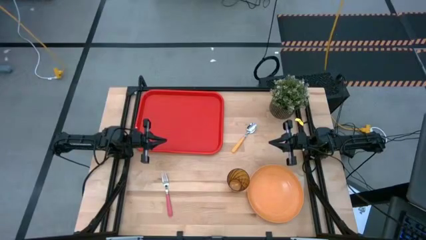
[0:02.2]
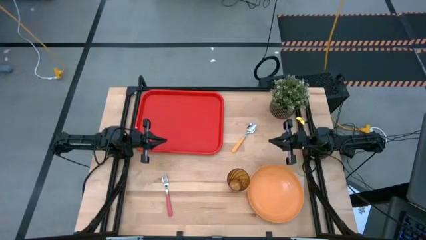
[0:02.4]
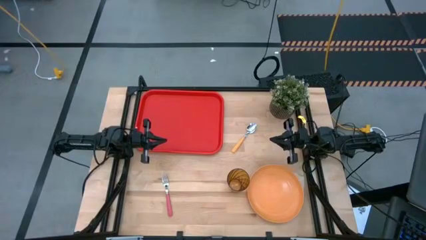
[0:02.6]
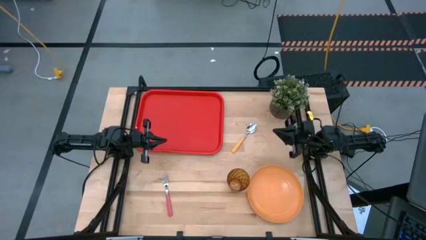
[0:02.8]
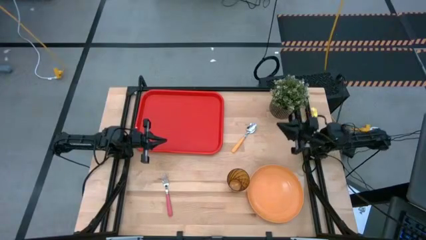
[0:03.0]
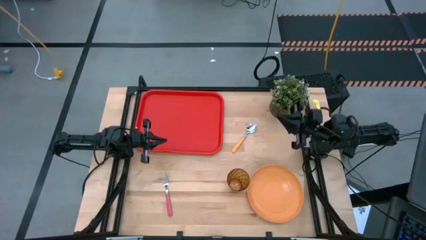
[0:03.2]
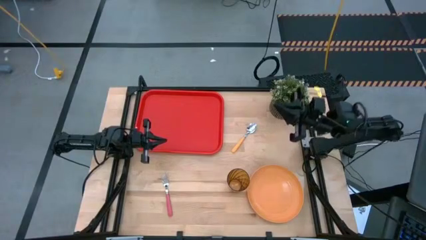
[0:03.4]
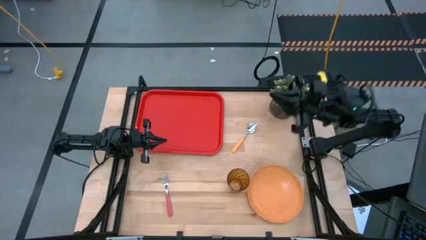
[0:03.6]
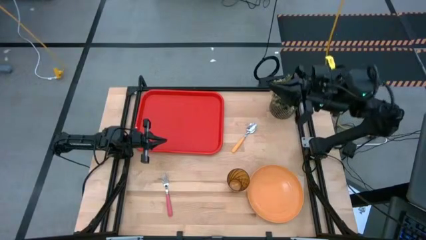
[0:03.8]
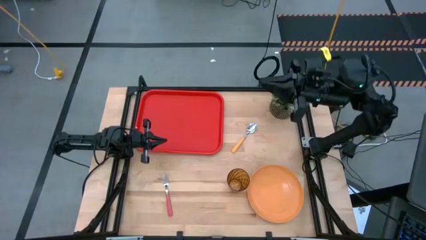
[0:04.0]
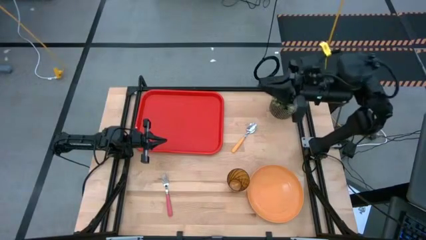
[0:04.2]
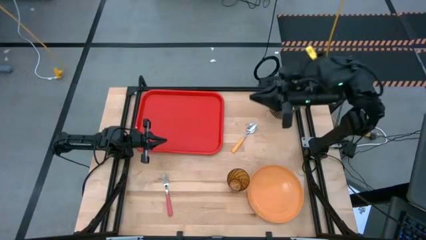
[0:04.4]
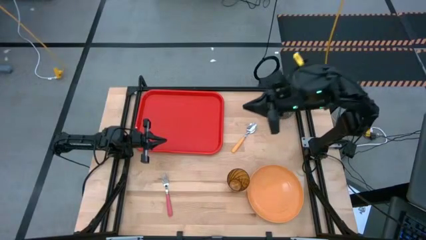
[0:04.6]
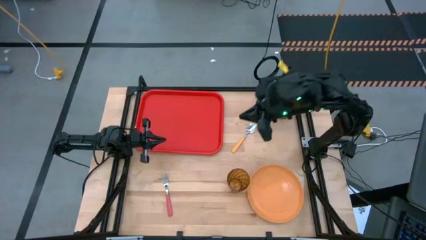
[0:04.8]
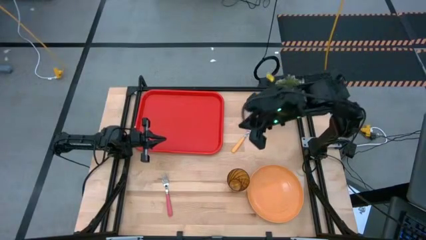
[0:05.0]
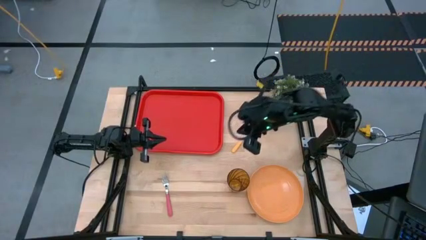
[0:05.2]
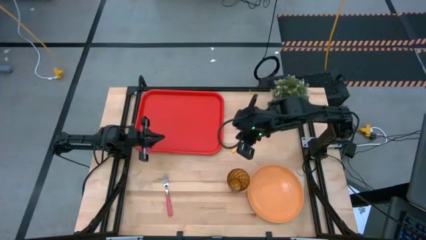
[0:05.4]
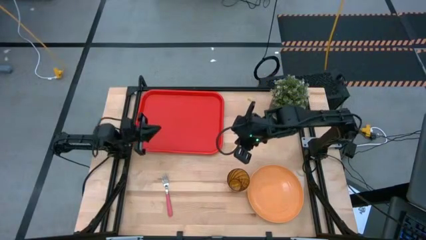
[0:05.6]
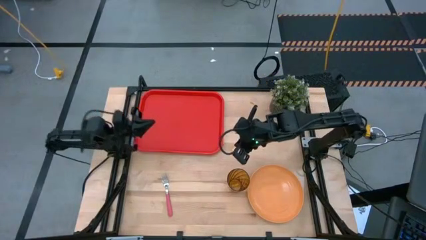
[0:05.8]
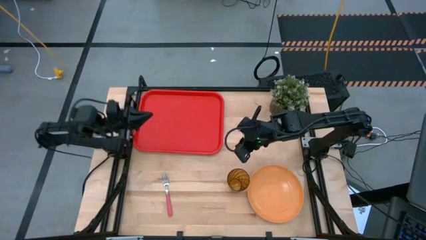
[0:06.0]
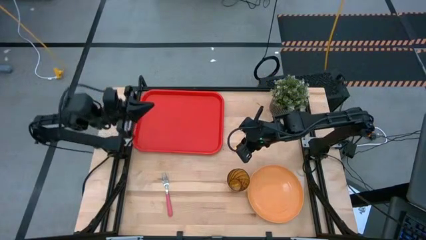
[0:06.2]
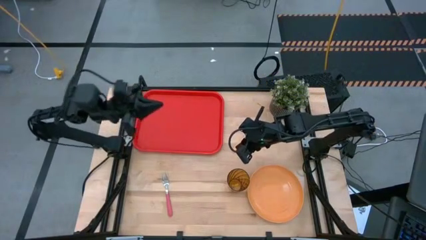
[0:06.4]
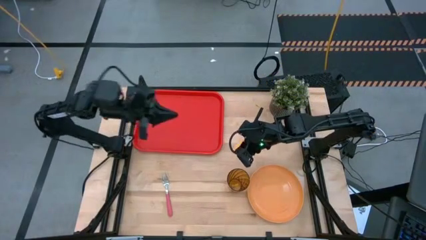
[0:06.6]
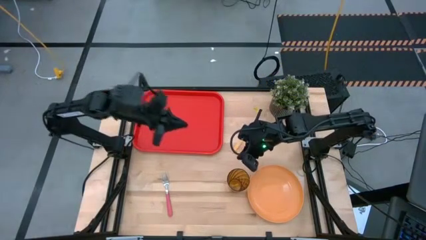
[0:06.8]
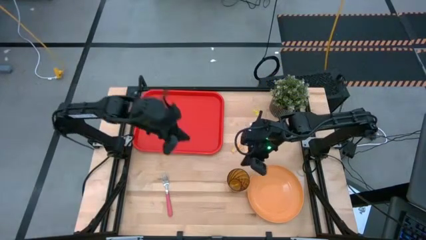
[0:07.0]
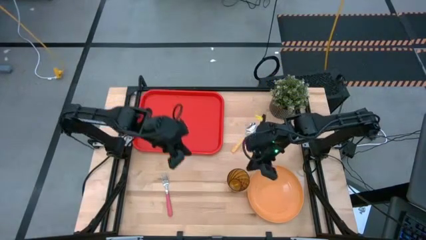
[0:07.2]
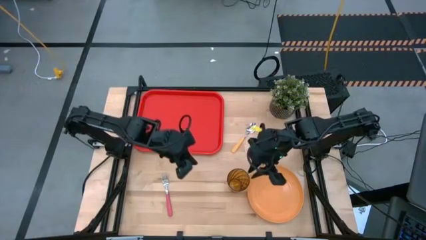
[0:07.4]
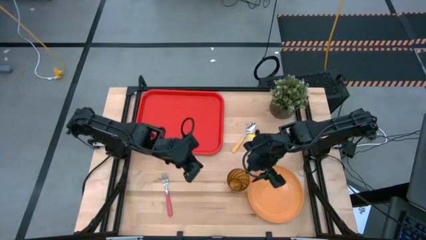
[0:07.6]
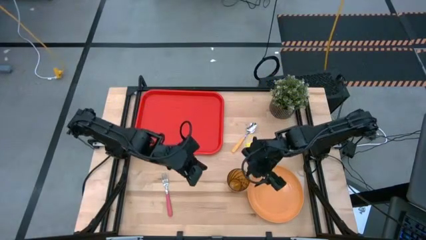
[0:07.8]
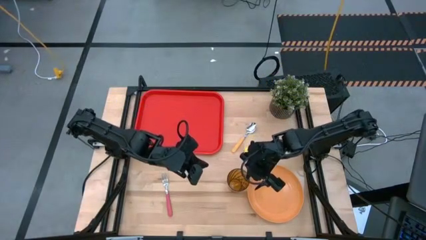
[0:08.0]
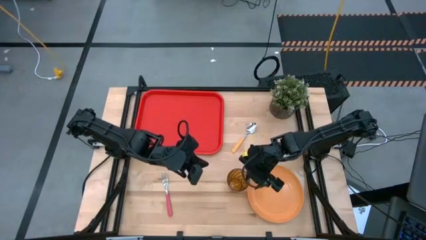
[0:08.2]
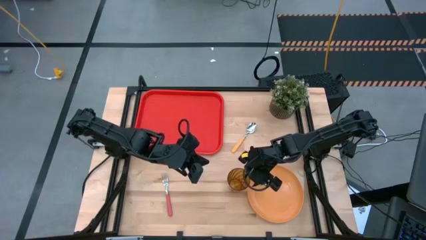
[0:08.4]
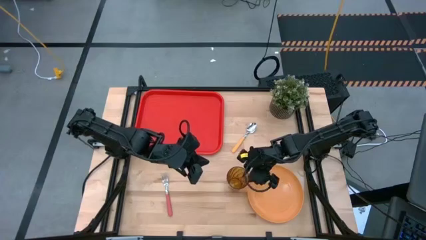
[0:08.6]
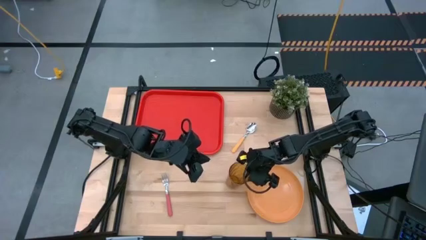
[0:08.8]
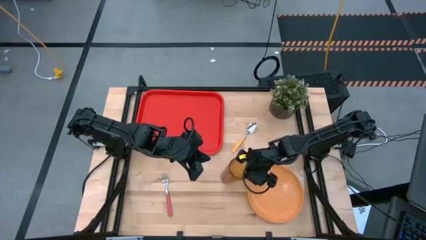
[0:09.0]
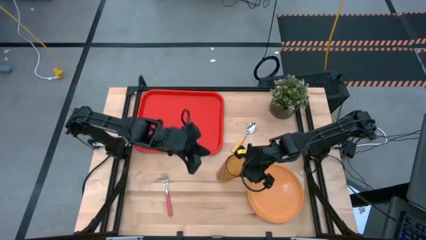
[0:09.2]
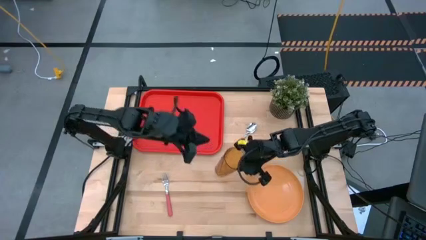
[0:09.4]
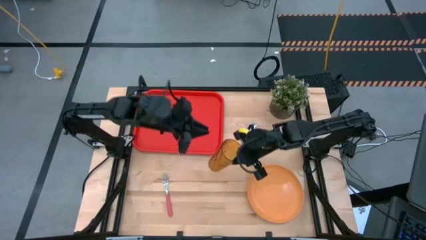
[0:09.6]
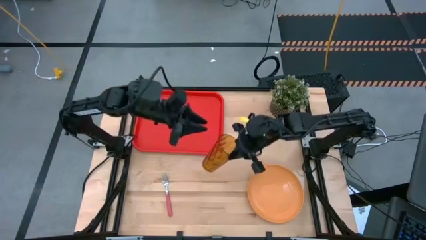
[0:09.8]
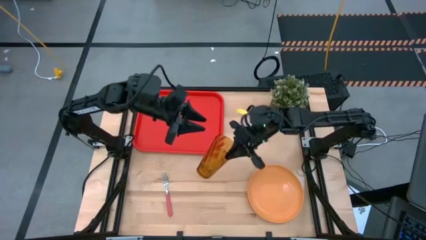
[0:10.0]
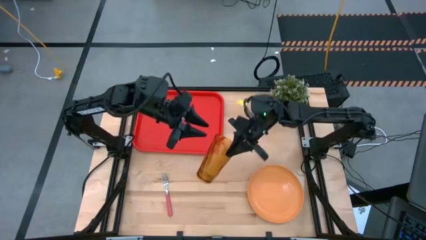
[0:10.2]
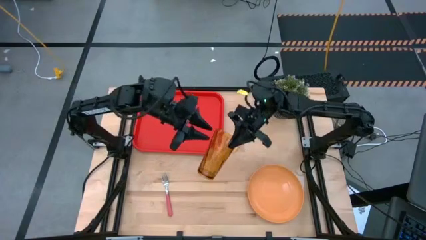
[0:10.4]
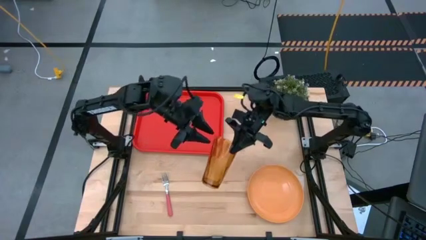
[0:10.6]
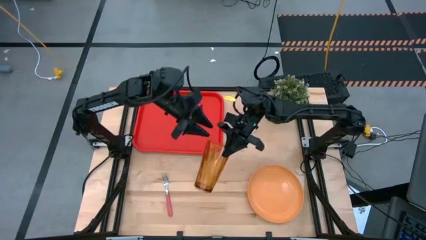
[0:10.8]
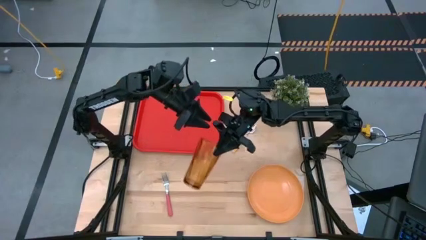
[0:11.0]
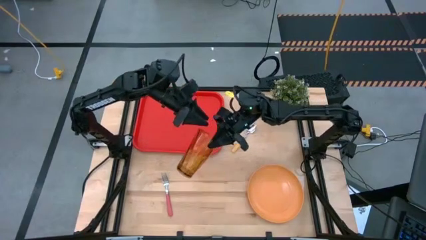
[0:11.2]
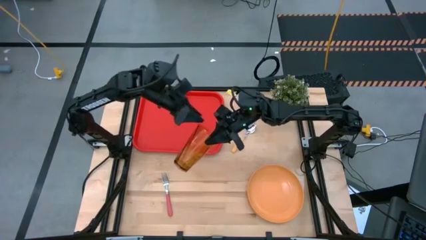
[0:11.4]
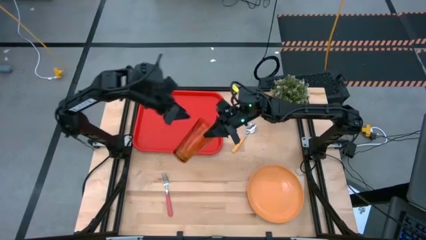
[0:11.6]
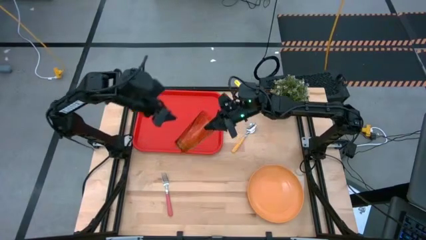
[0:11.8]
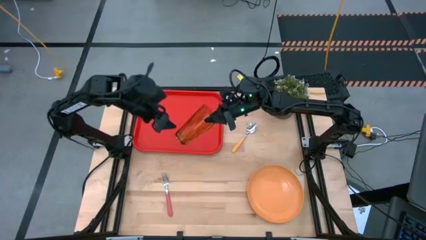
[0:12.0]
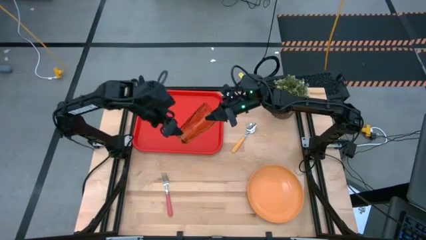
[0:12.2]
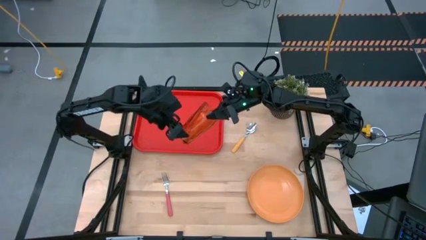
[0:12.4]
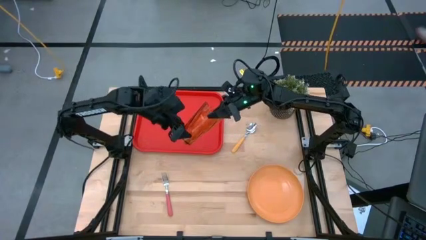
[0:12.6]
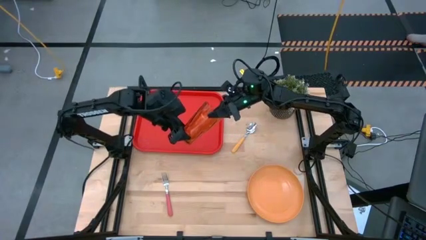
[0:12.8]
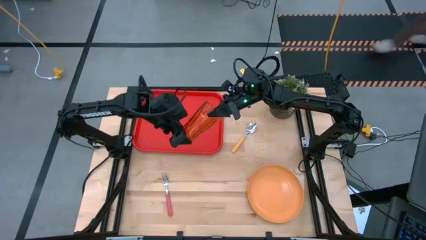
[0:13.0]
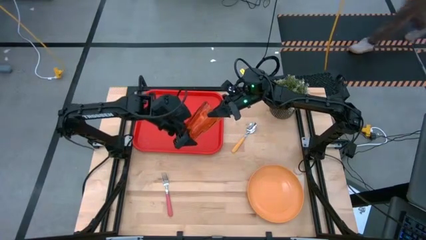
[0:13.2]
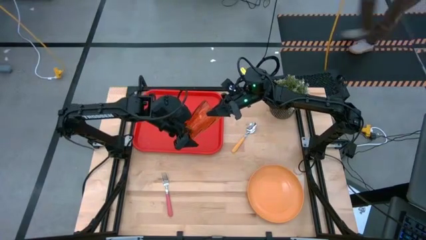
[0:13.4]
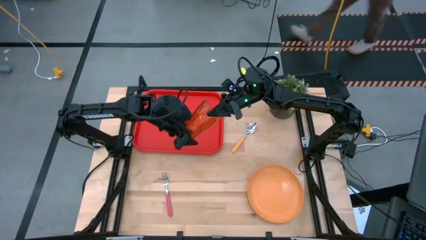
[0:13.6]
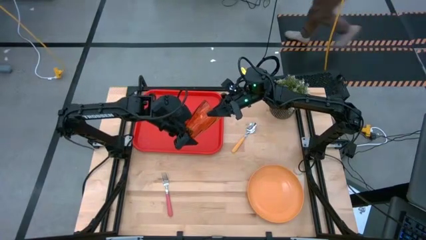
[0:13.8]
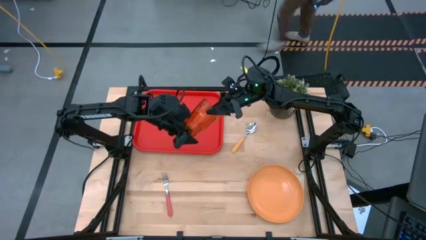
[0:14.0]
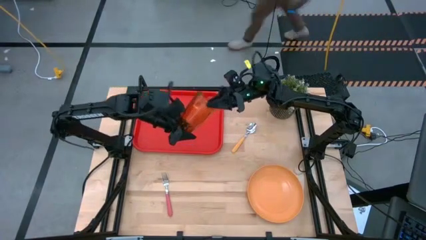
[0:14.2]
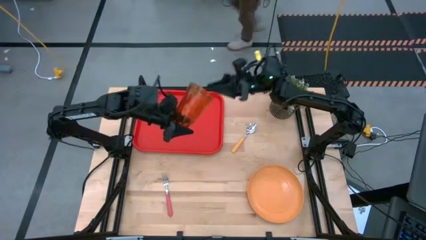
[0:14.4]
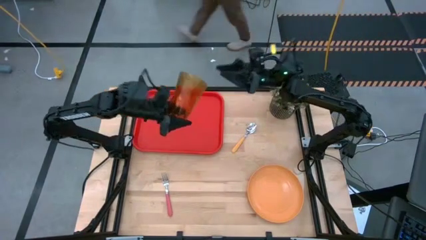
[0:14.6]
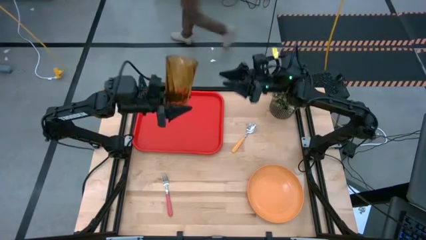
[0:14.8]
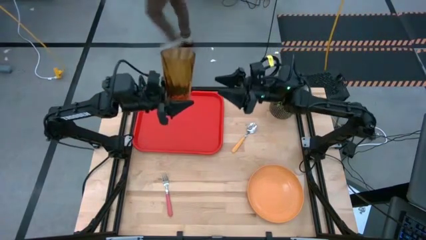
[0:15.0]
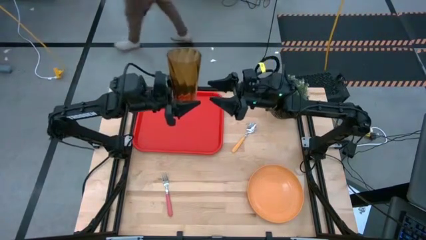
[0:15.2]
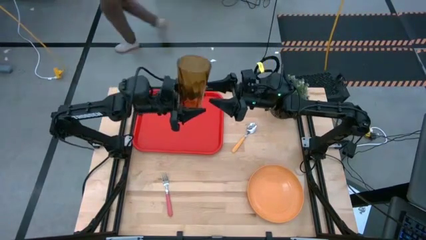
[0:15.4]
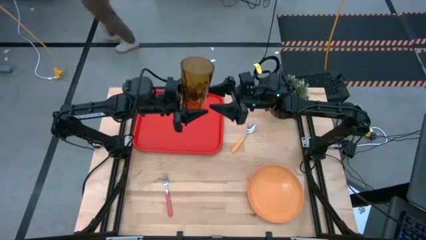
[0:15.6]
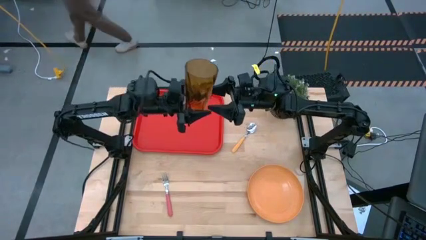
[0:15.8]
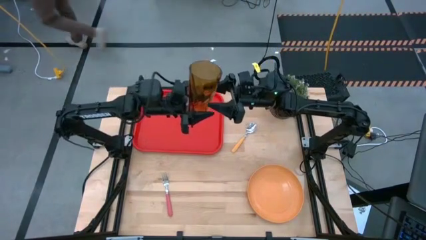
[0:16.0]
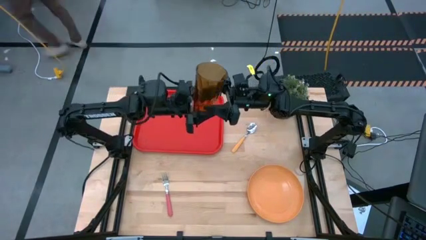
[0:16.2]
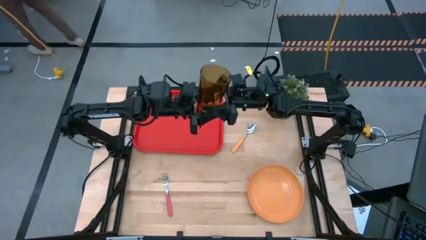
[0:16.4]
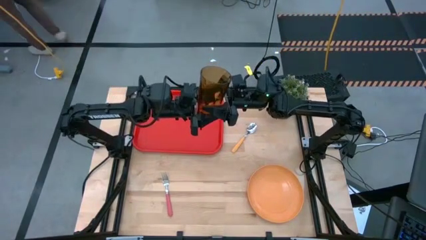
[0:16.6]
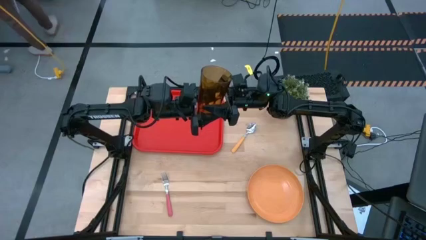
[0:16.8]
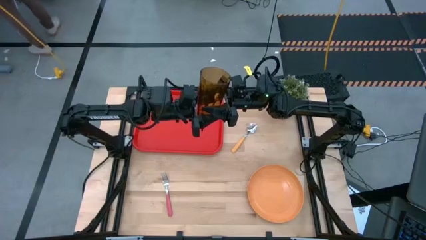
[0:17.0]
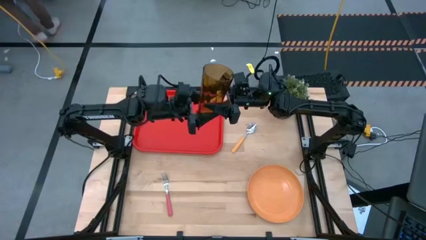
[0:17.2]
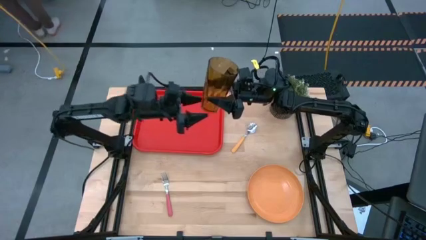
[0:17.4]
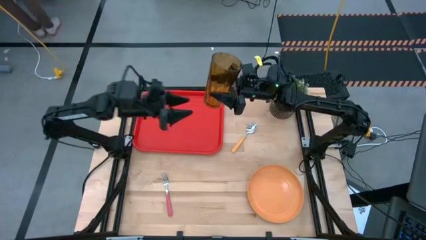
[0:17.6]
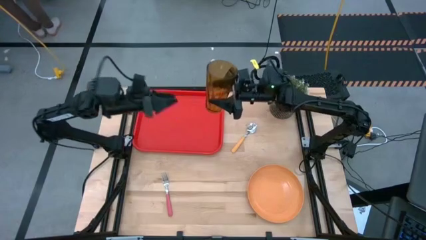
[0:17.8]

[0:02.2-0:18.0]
Task: Pick and place plate/cup/fork/spoon on tray
Put the orange cup on the red tray
